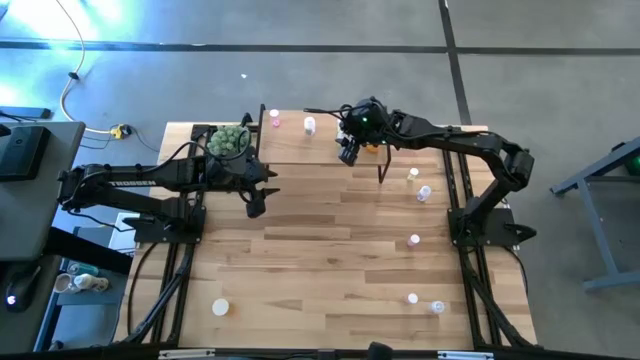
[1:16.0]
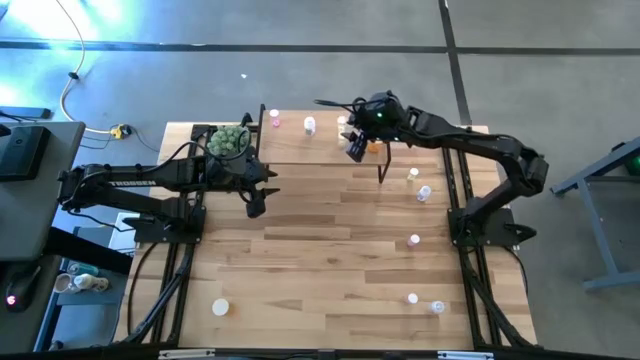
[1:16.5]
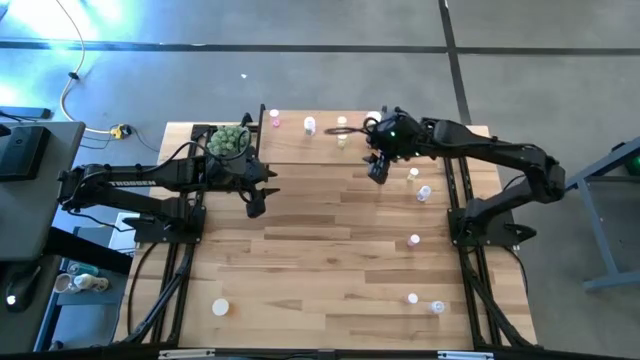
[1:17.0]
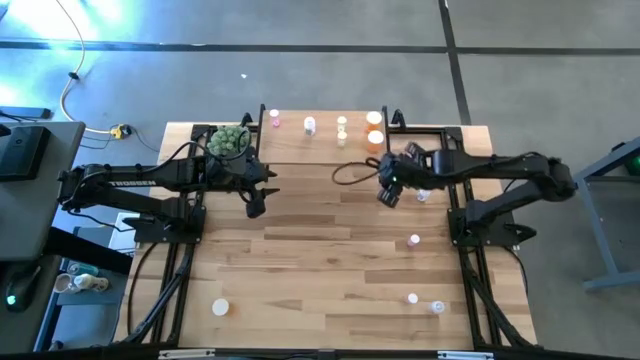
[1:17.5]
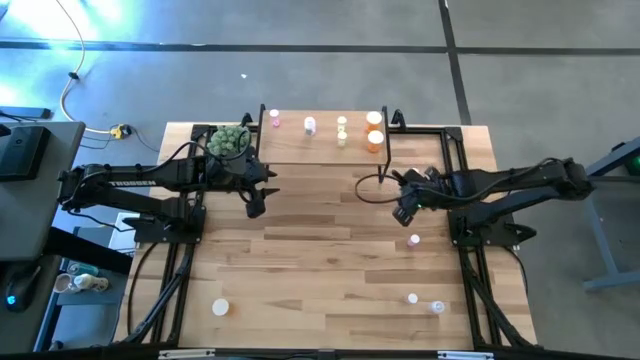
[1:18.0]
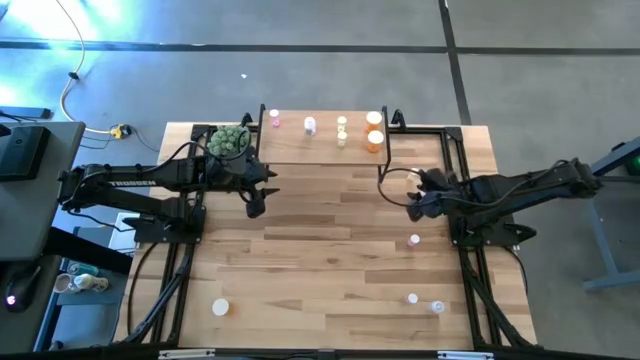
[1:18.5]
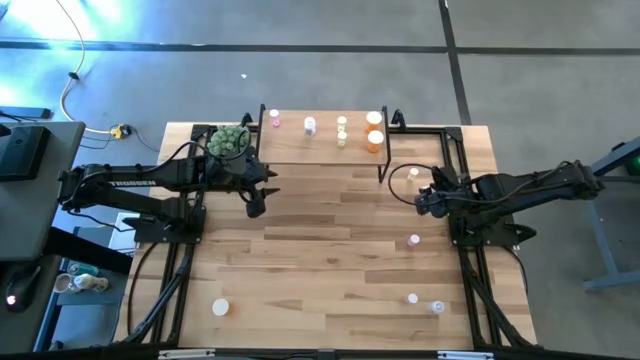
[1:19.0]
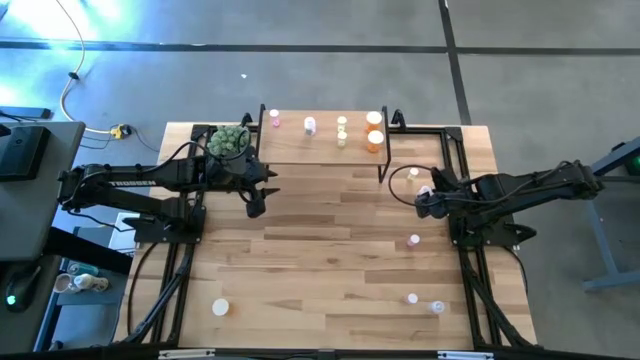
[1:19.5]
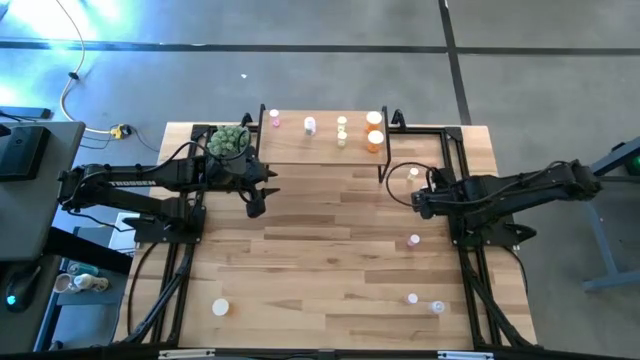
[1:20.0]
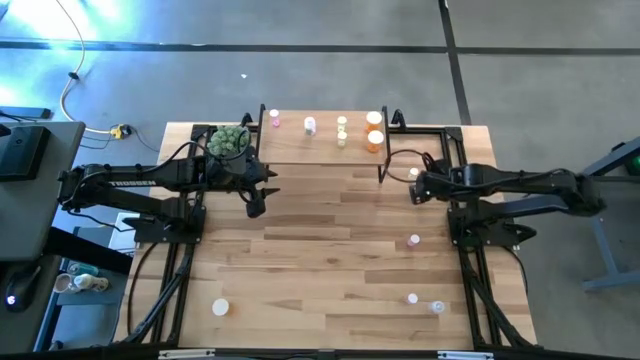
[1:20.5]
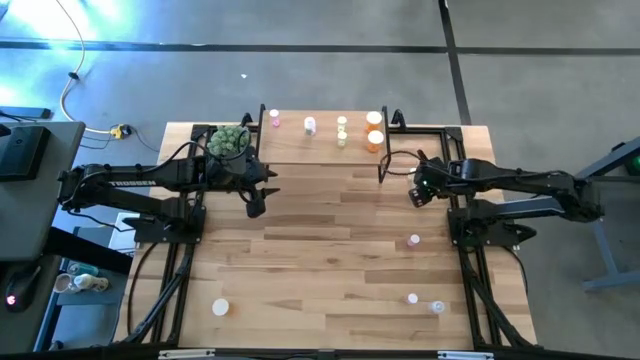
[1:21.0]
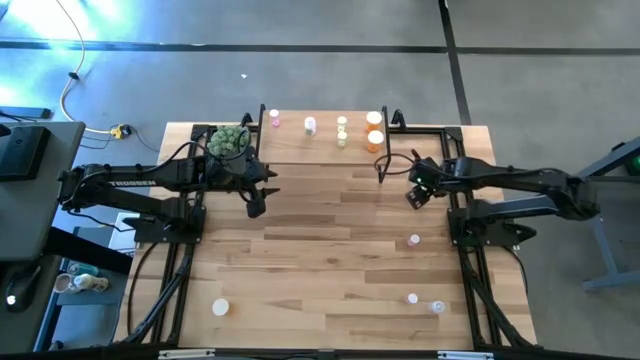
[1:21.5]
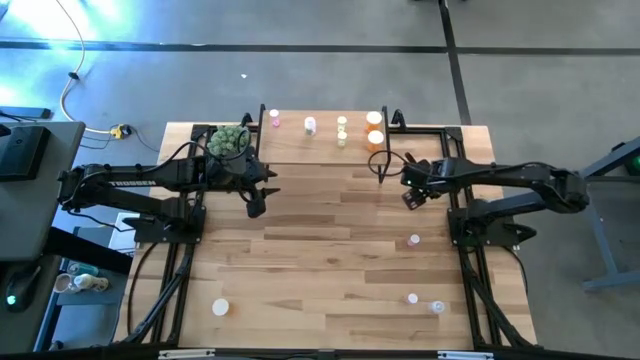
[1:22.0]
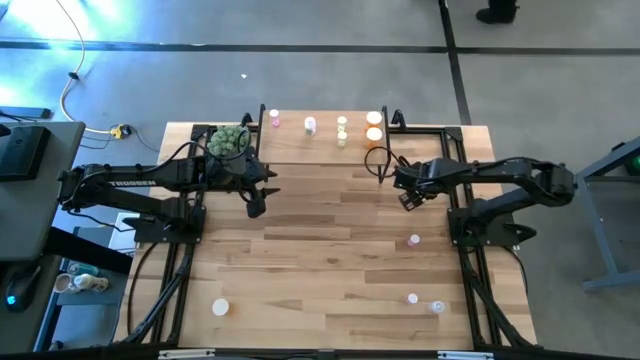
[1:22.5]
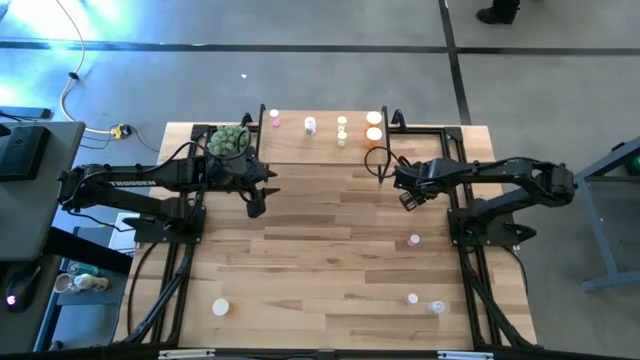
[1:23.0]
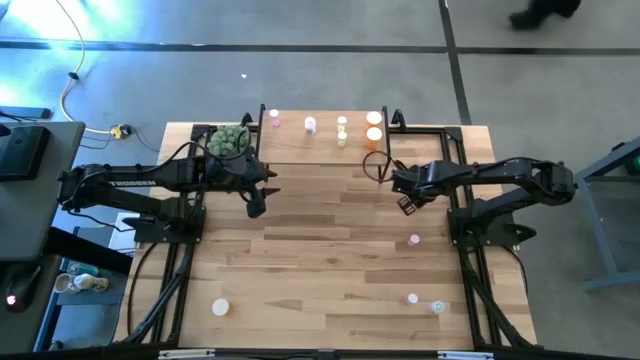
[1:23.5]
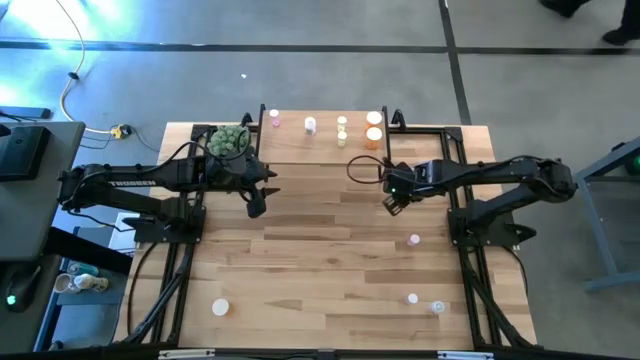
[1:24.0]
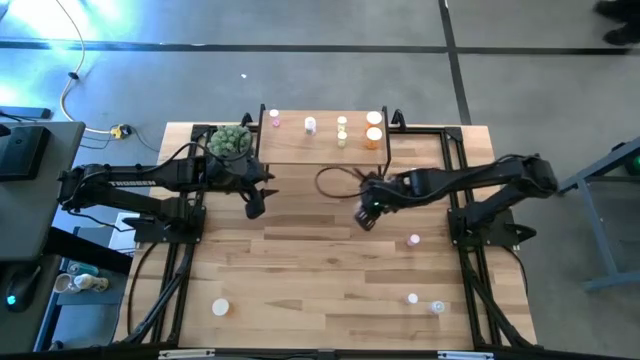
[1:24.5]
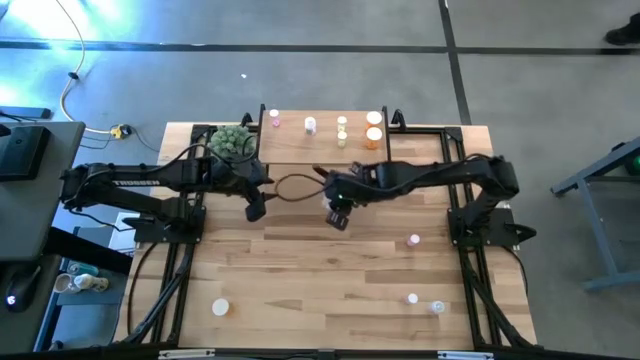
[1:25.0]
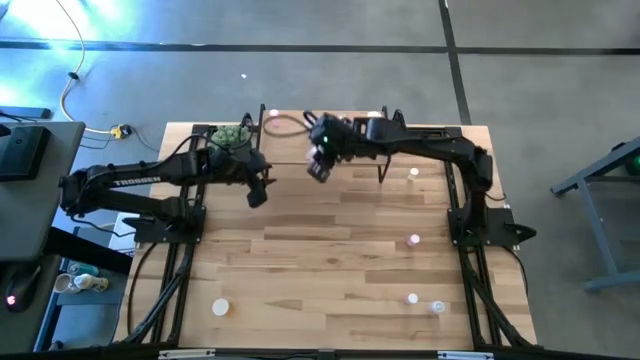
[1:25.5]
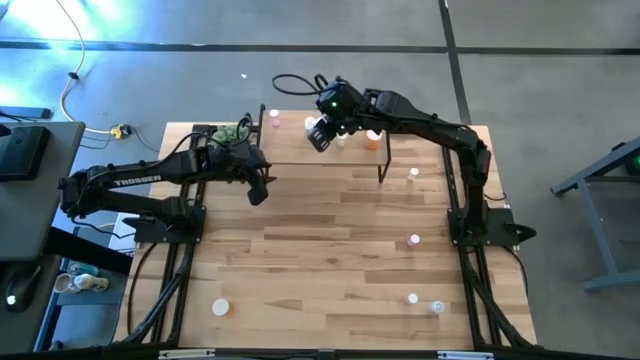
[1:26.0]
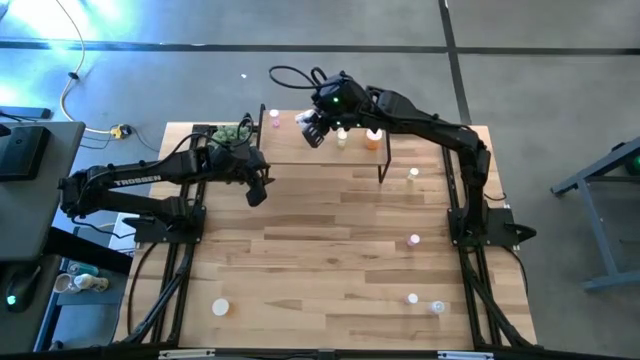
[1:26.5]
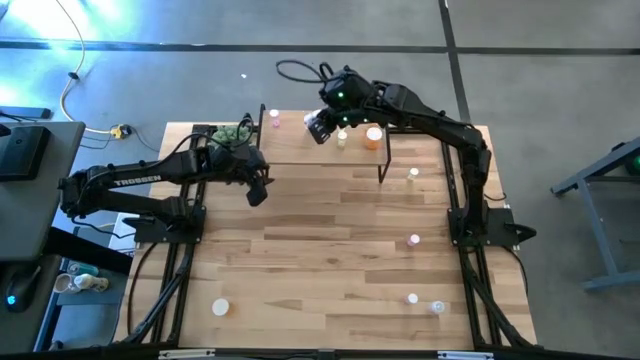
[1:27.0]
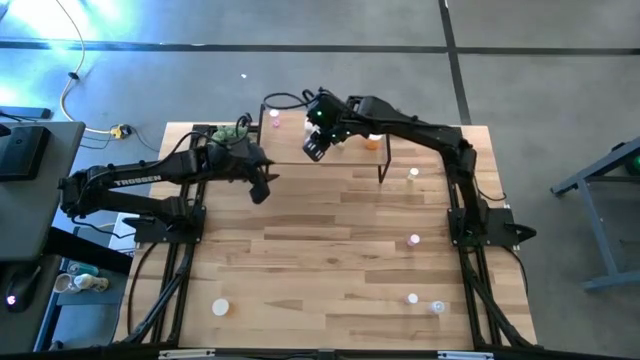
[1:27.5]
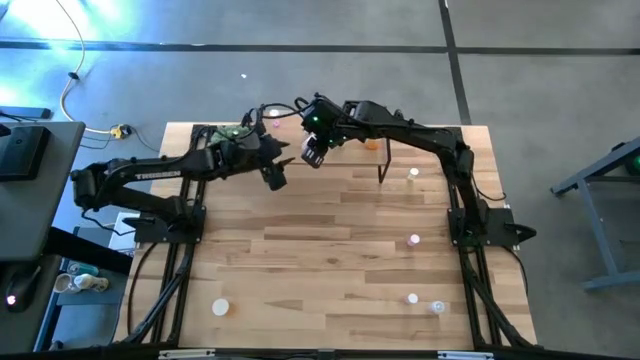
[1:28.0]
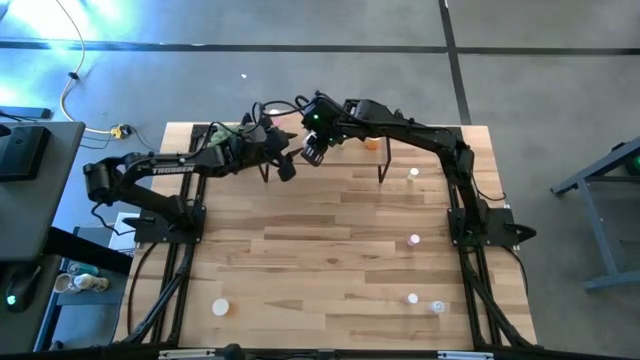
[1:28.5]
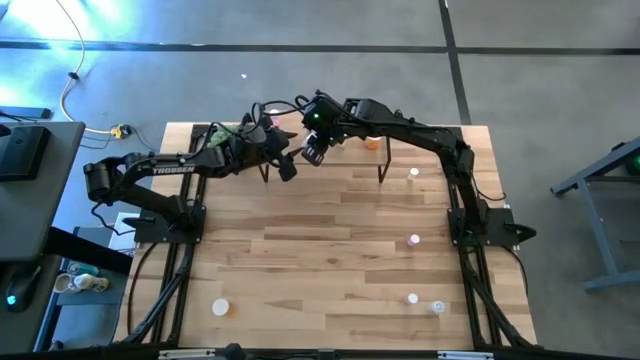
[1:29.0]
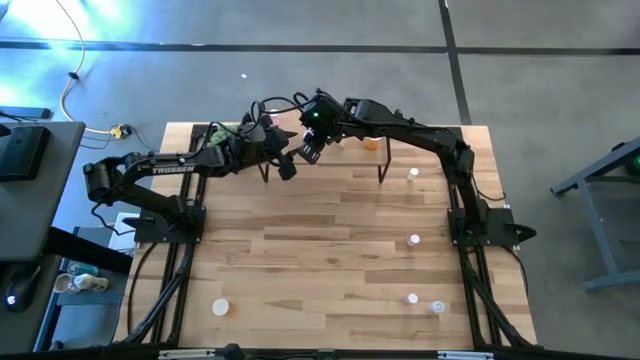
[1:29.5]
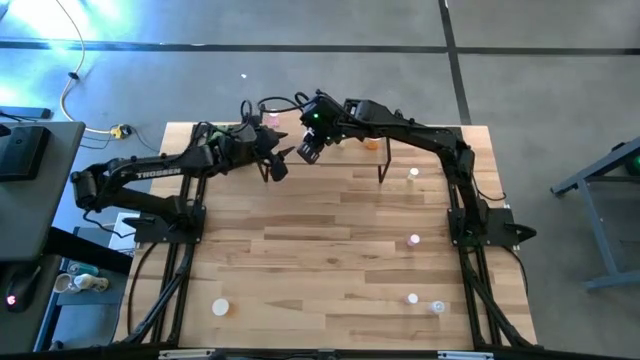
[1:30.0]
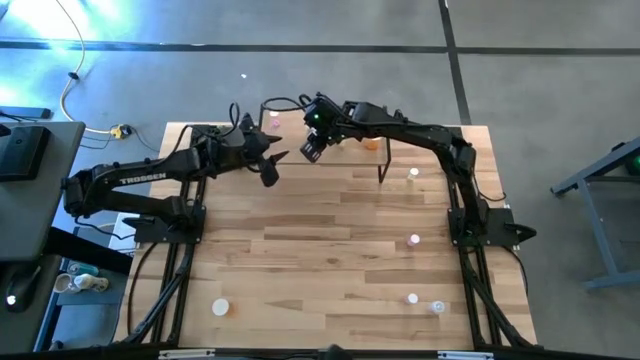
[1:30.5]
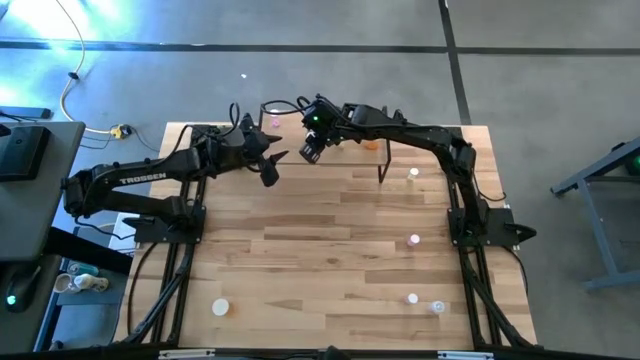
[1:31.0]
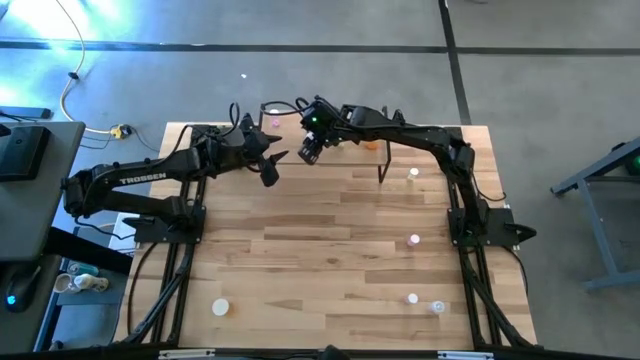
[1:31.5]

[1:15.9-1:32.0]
Task: Pick and place medicine bottles onto shelf by color
Put the top transparent pill bottle on the shelf aligned with the other transparent pill bottle

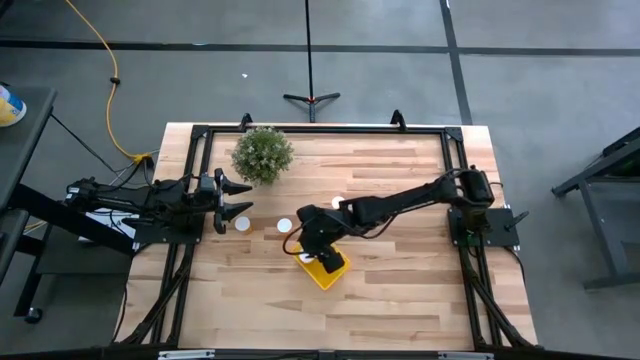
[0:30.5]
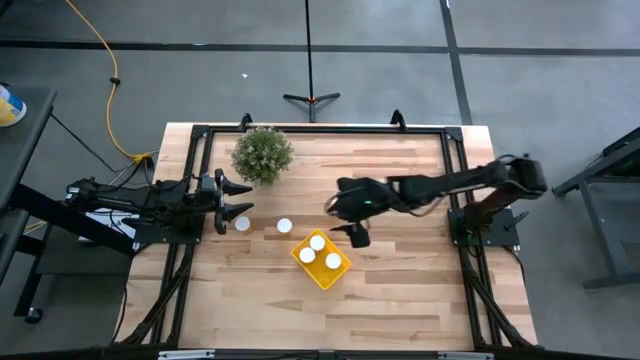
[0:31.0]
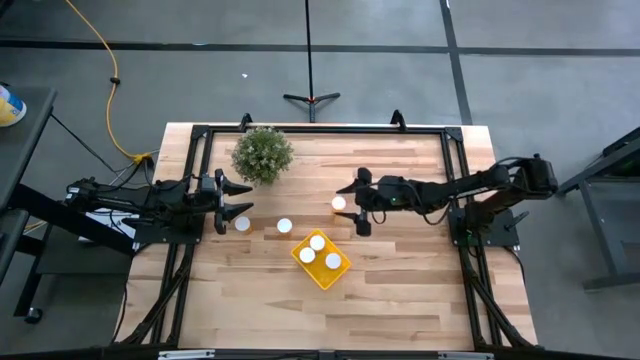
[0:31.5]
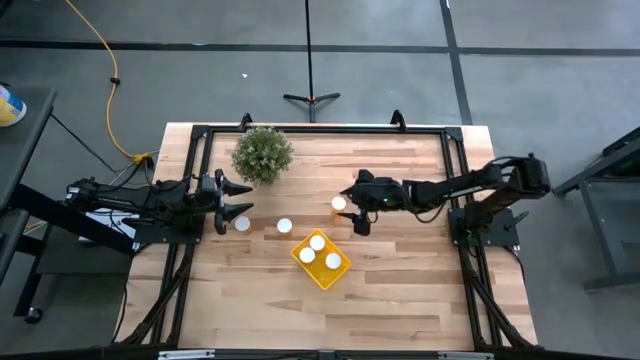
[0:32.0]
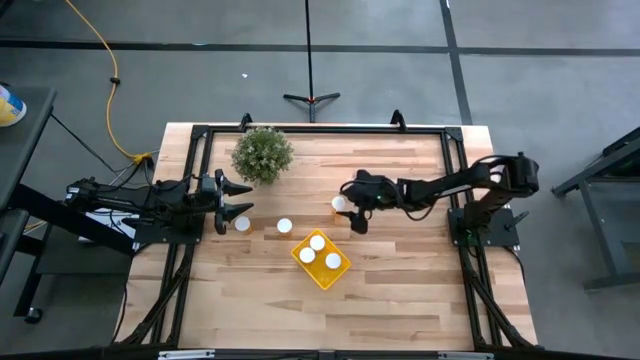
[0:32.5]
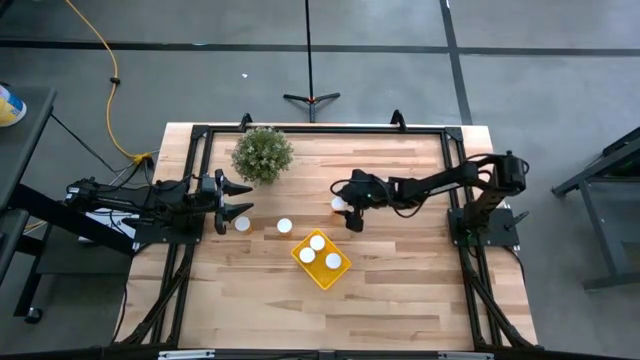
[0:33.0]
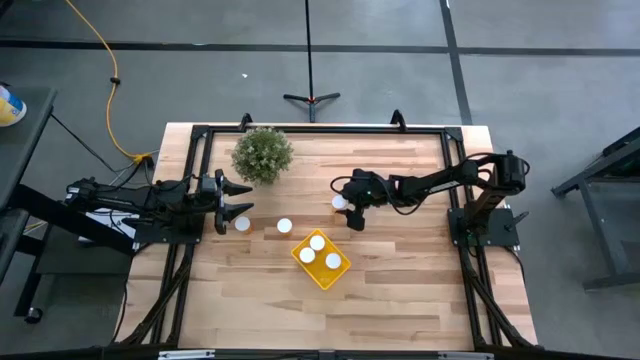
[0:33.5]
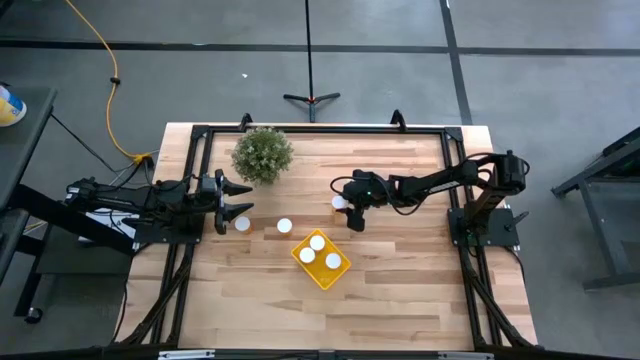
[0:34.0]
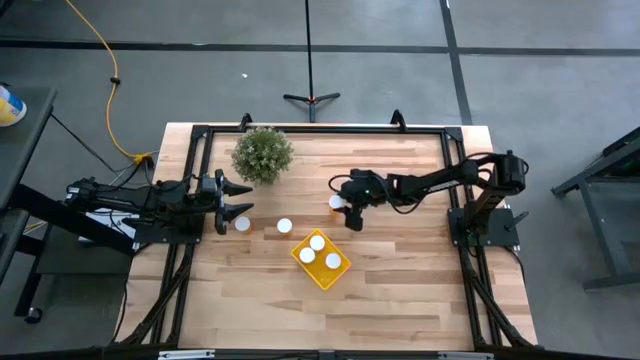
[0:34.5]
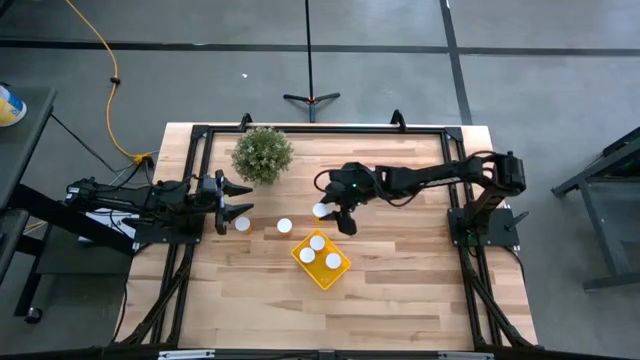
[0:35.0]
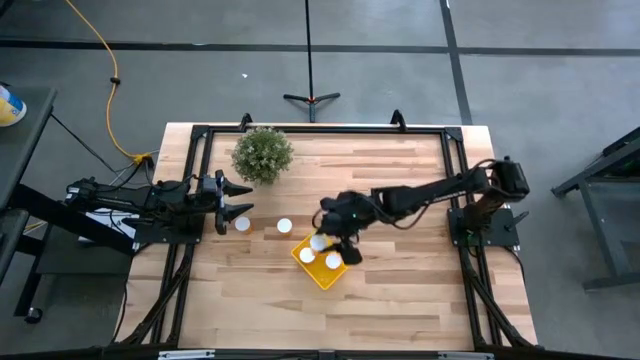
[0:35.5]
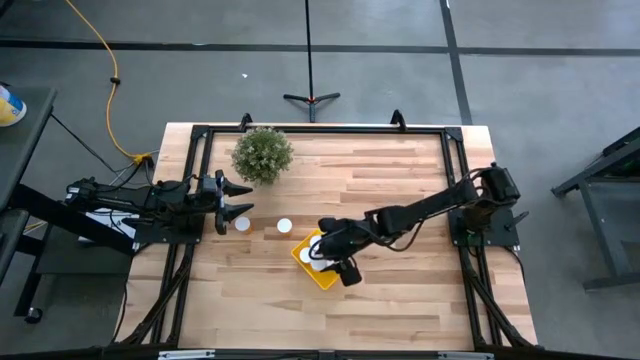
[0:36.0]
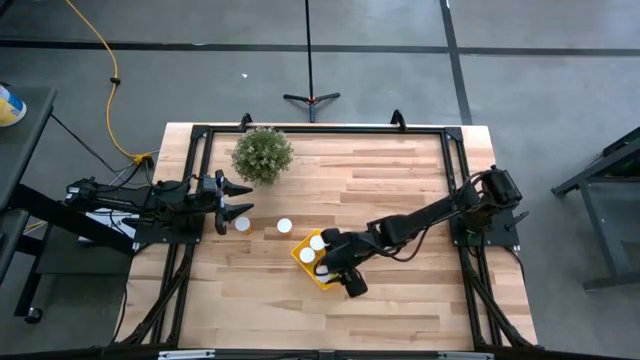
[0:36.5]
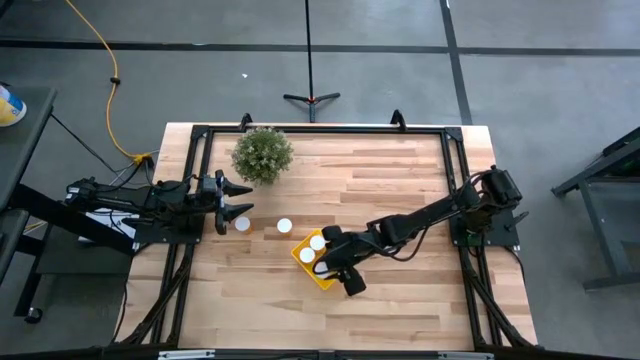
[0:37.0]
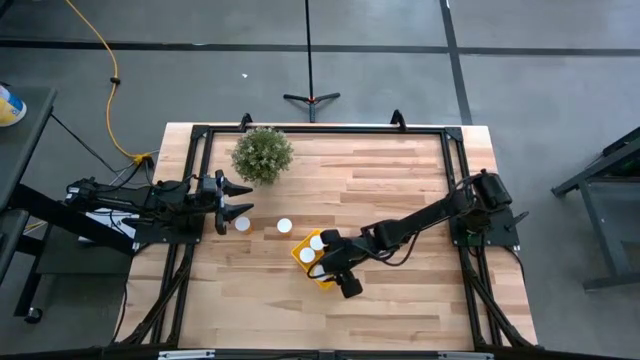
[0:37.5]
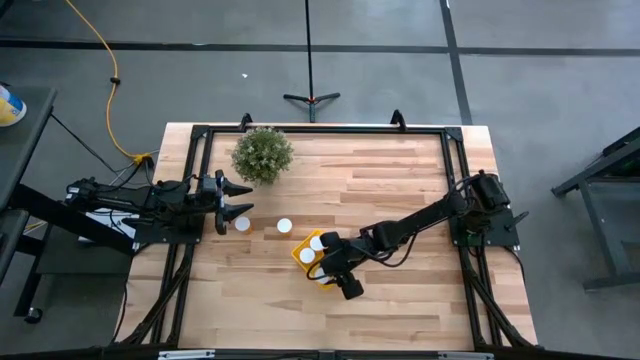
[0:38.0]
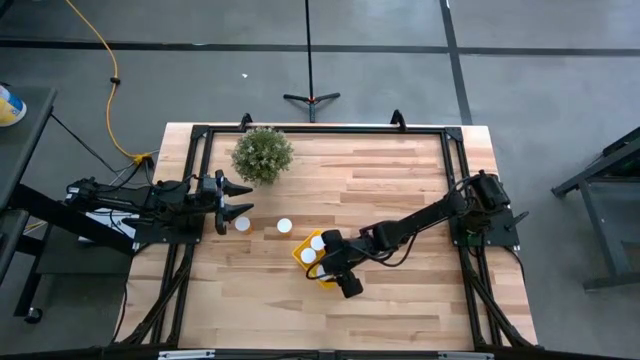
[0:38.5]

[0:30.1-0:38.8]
Task: Pick and place pill bottles into a basket
Put the pill bottle into the yellow transparent bin
